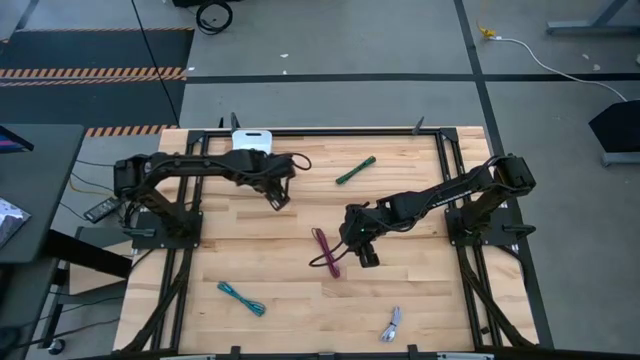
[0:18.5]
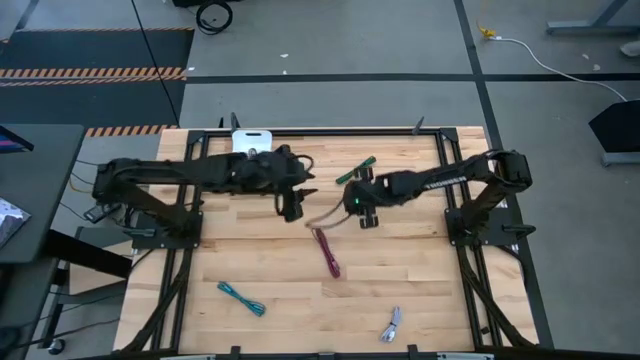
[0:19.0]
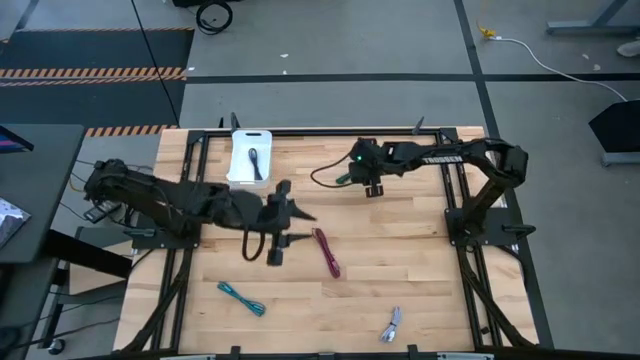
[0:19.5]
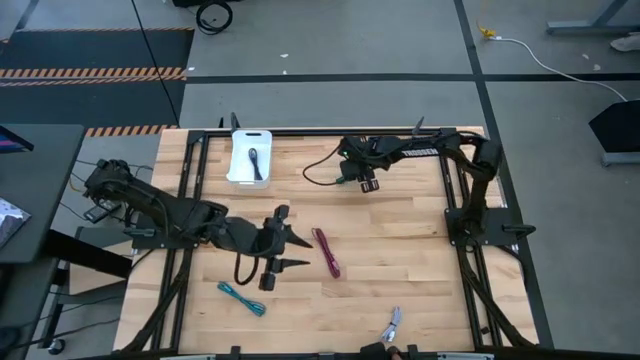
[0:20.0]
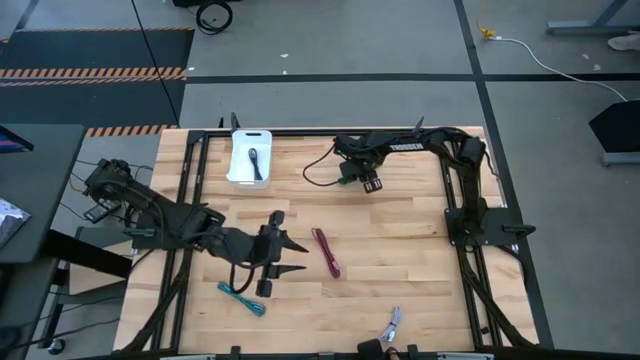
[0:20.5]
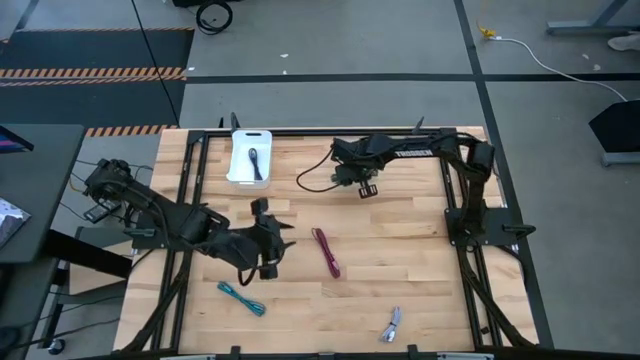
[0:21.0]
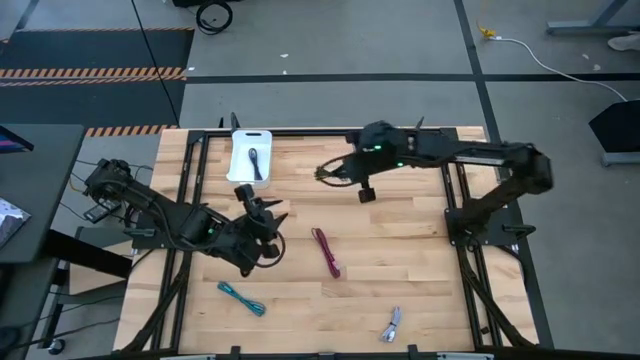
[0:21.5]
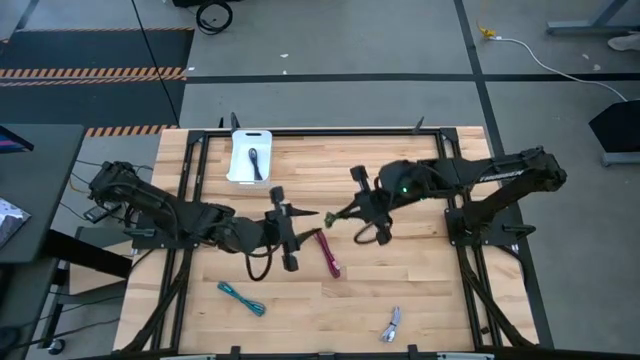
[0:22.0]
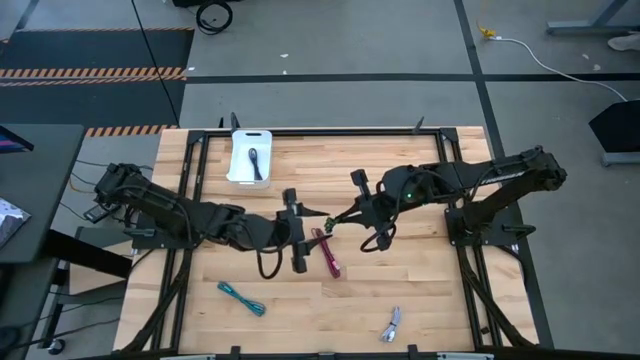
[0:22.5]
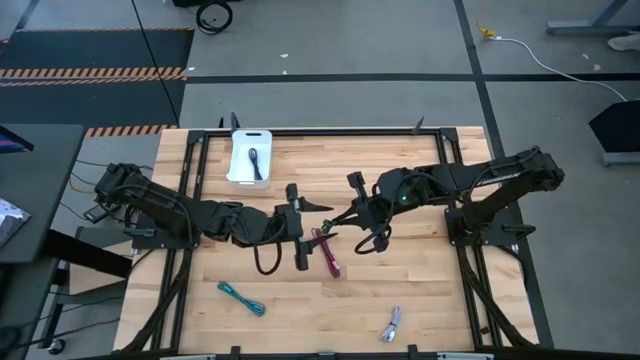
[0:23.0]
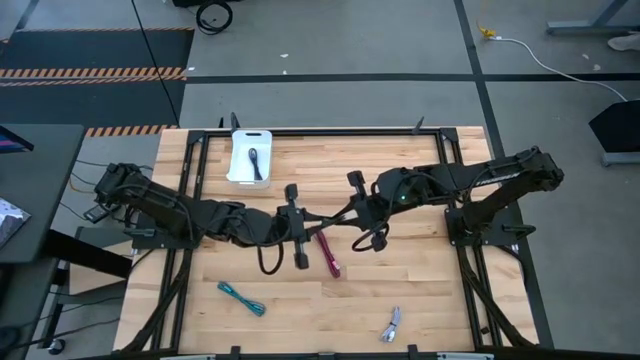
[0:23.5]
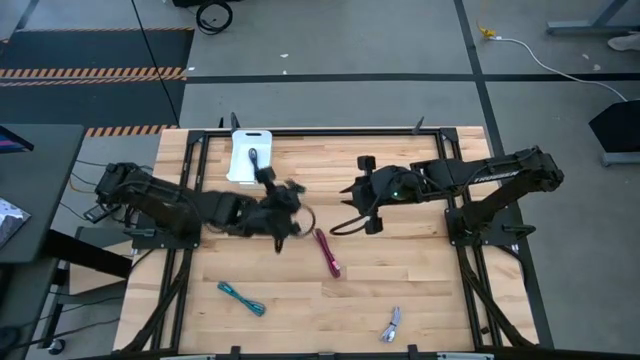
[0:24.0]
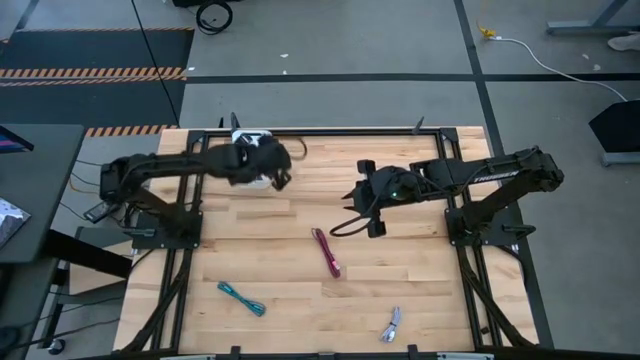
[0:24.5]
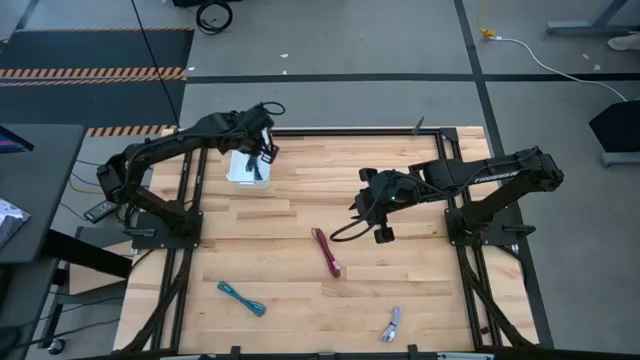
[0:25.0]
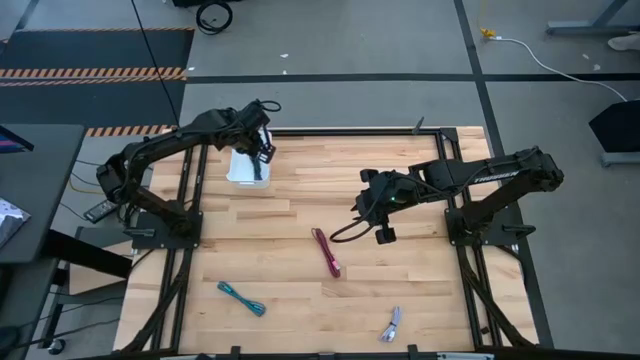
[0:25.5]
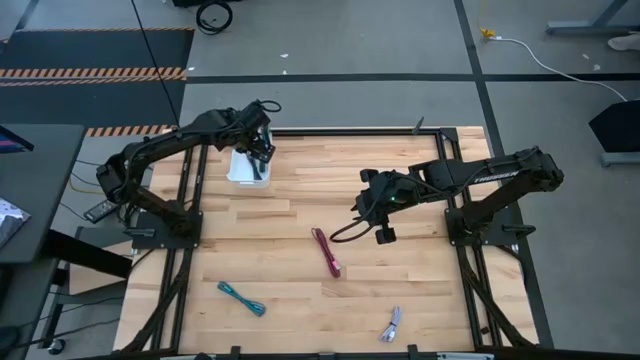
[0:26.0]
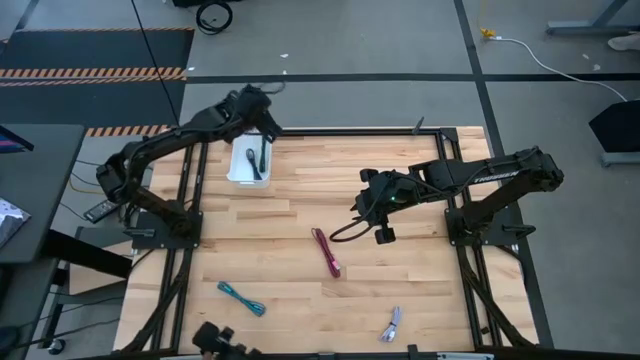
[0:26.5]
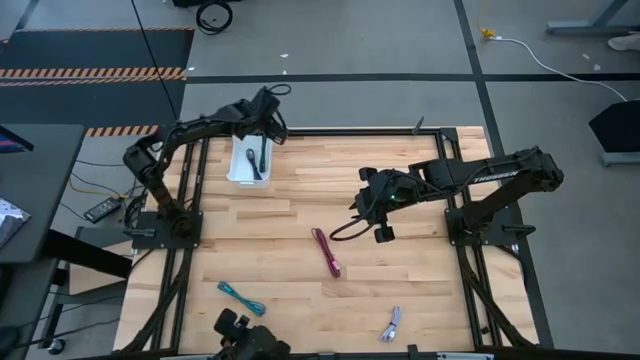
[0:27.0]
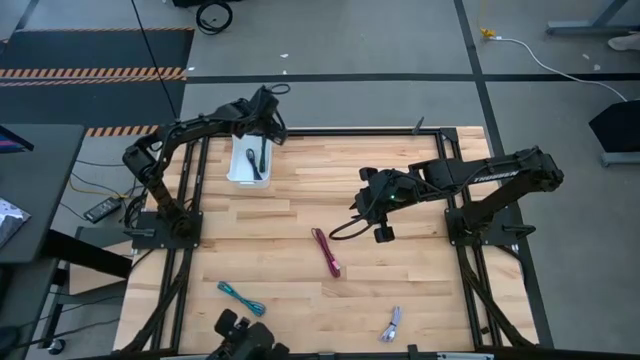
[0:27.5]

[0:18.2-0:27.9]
Task: Pick and place USB-C Cables
Put the green charger cable into the white bin

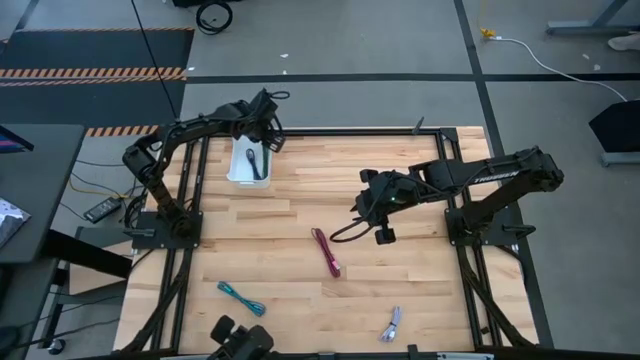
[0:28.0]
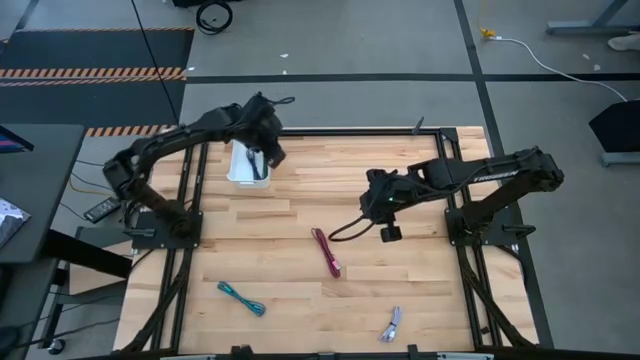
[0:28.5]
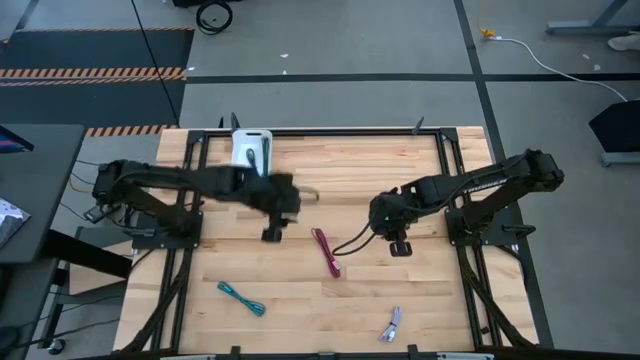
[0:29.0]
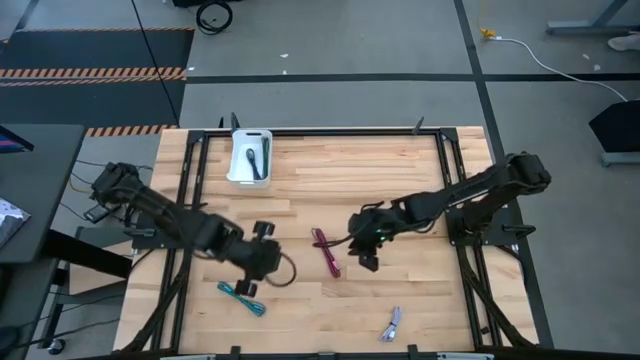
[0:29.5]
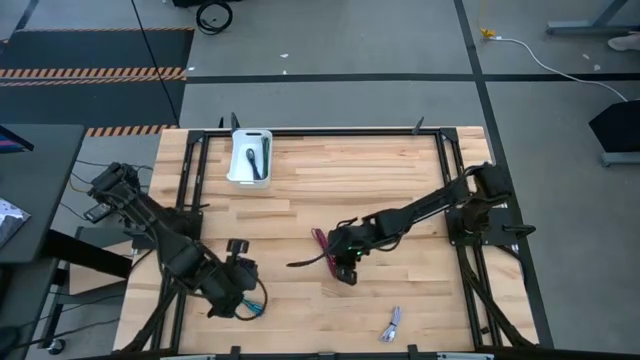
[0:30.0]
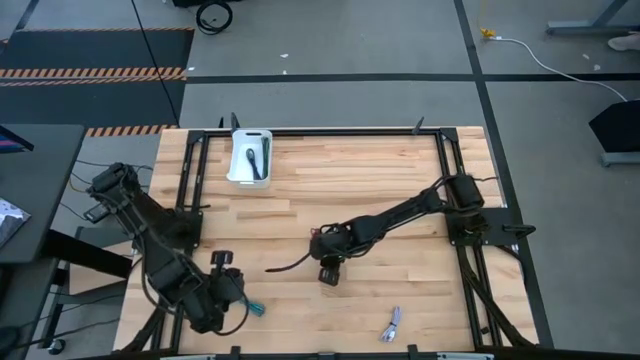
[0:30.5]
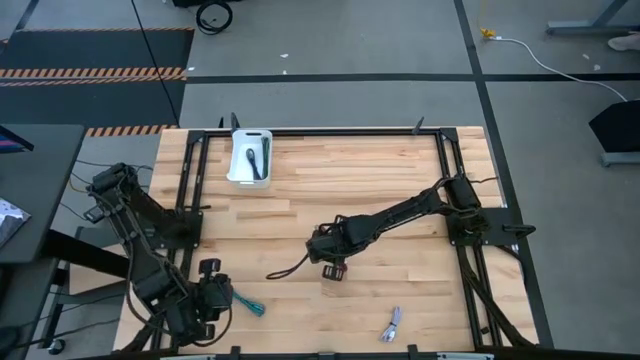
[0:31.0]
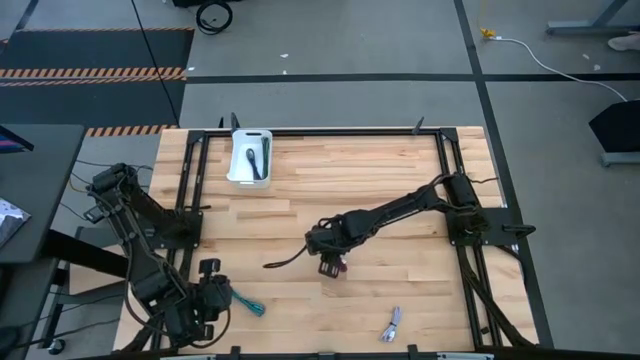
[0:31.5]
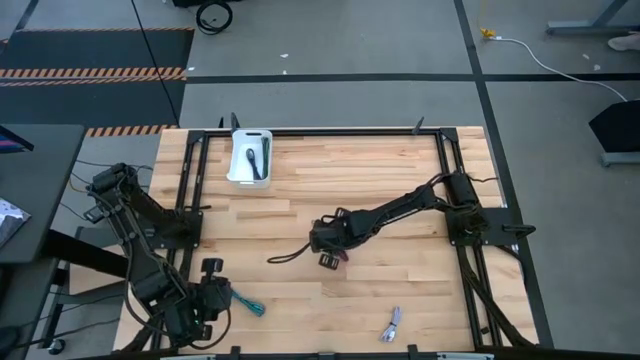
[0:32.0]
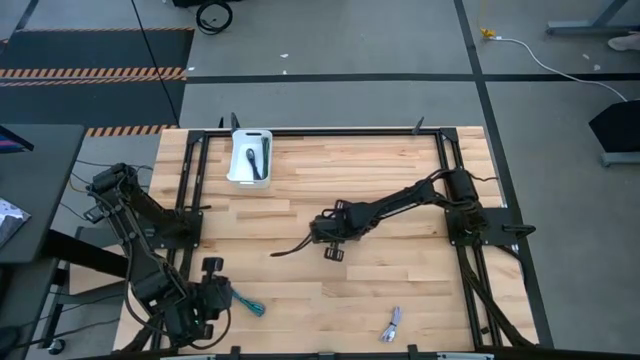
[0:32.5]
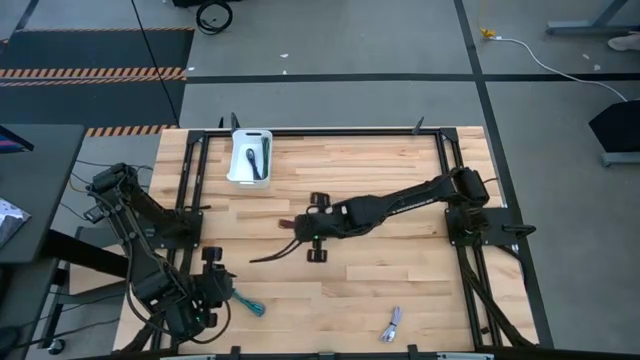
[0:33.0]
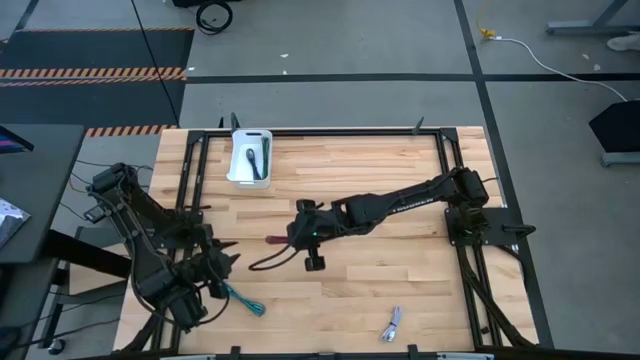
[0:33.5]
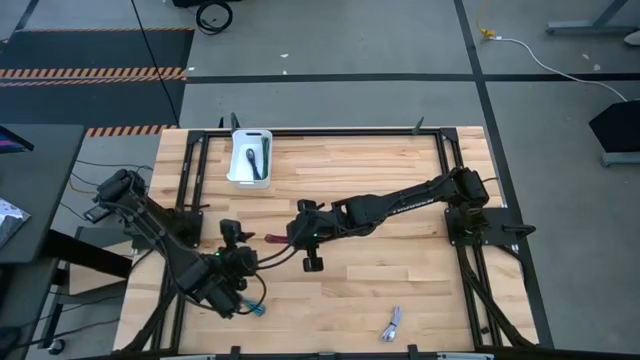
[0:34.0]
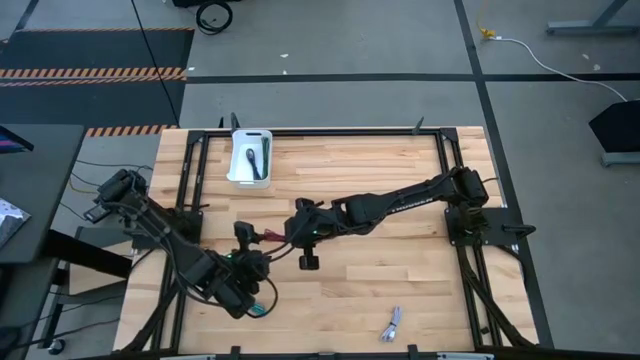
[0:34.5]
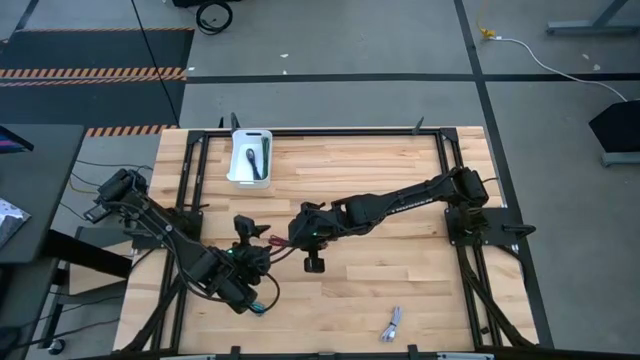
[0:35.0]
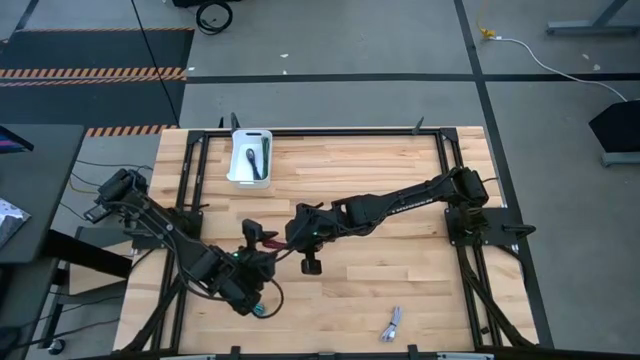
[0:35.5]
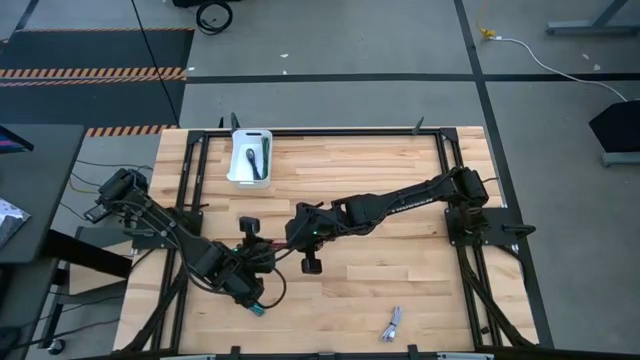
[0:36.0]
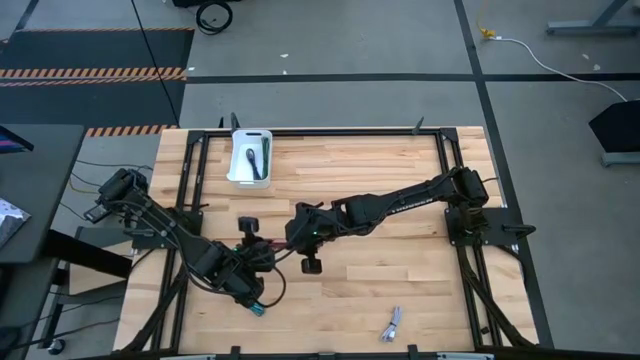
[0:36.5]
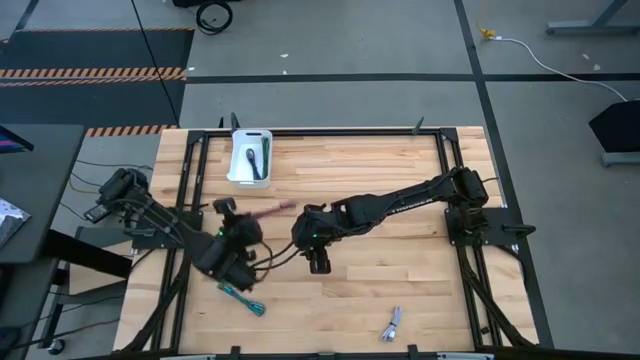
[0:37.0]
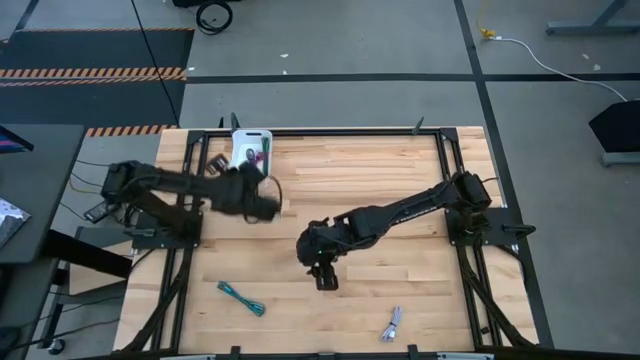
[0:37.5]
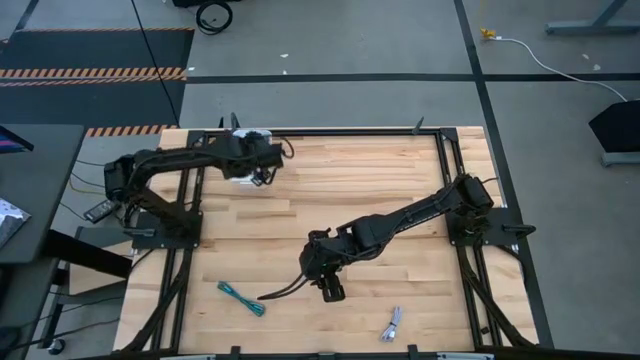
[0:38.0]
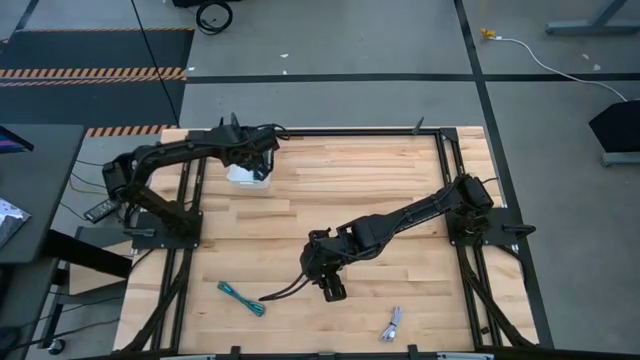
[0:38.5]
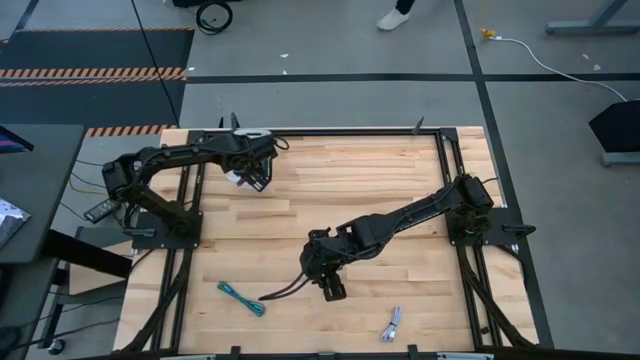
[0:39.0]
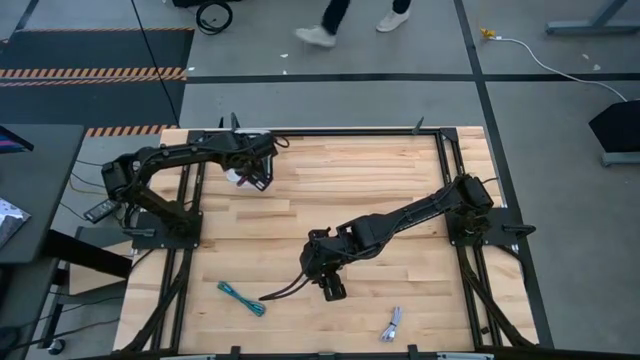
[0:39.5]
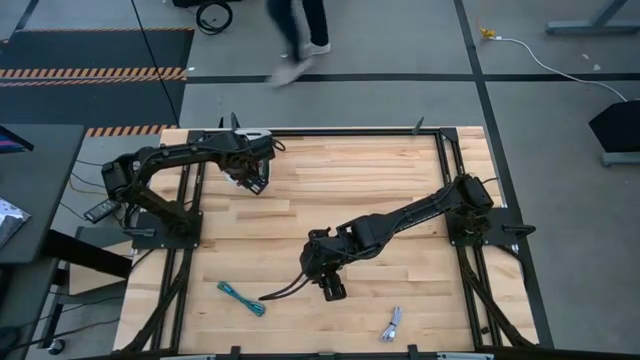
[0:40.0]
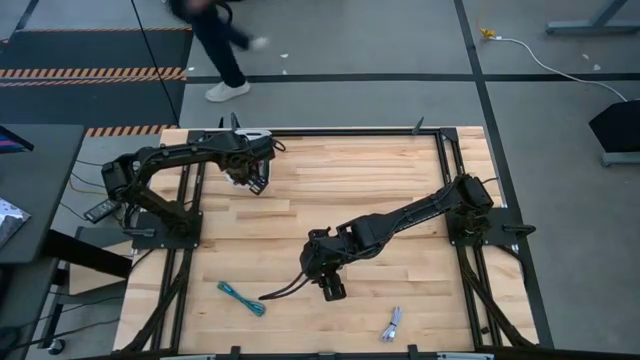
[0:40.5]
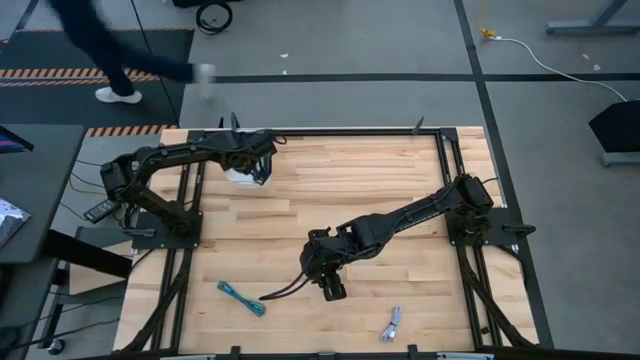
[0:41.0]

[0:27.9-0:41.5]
Put the pink charger cable into the white bin
